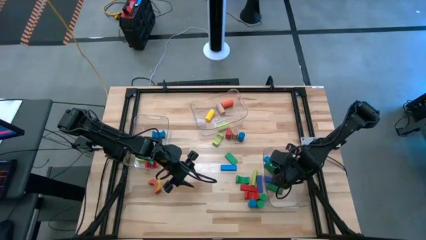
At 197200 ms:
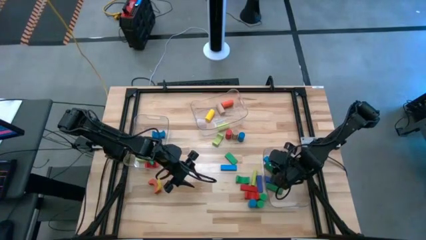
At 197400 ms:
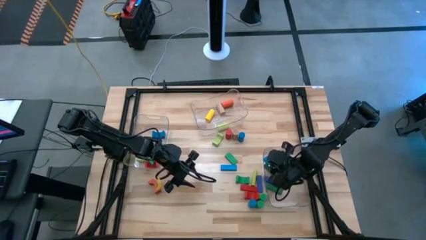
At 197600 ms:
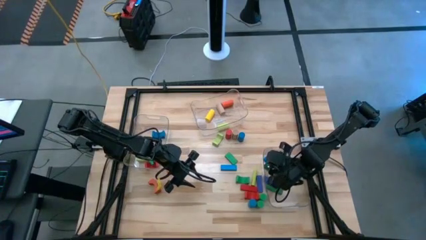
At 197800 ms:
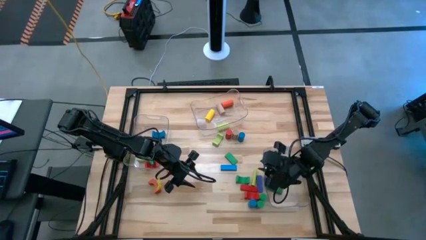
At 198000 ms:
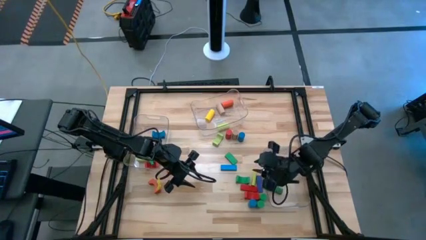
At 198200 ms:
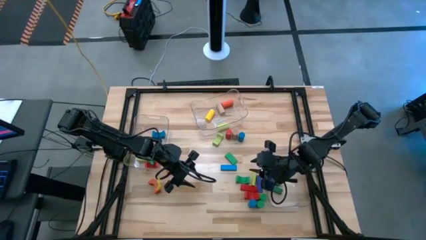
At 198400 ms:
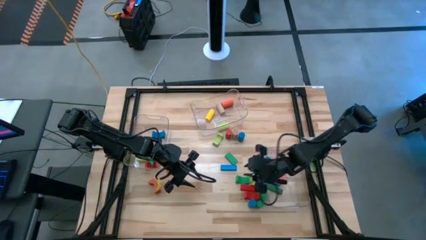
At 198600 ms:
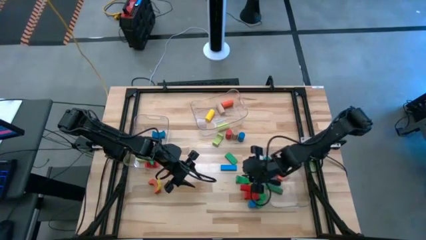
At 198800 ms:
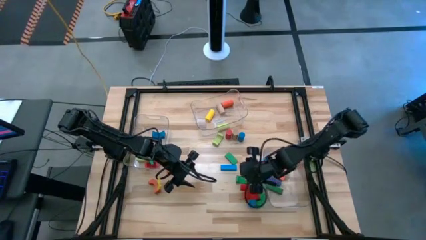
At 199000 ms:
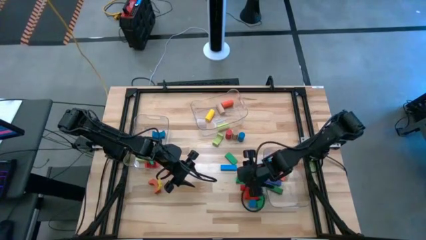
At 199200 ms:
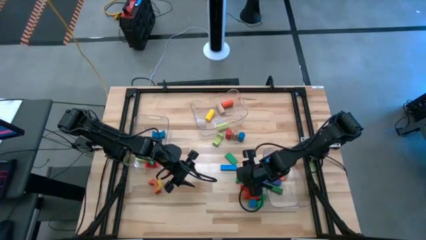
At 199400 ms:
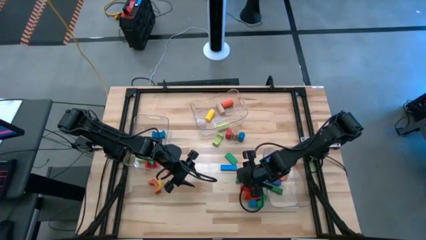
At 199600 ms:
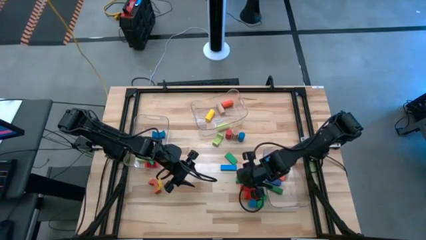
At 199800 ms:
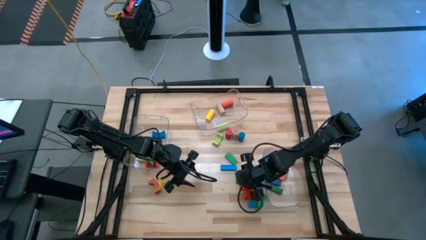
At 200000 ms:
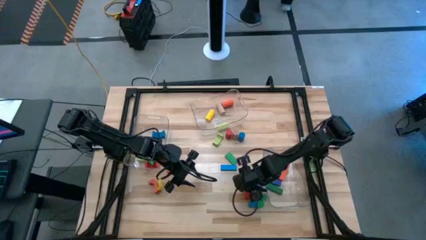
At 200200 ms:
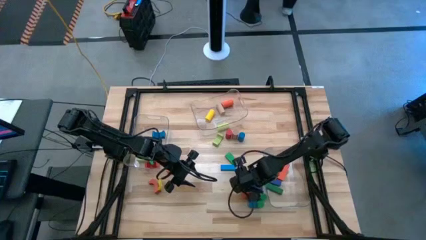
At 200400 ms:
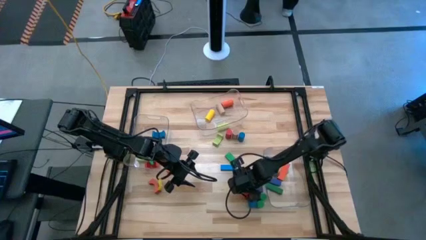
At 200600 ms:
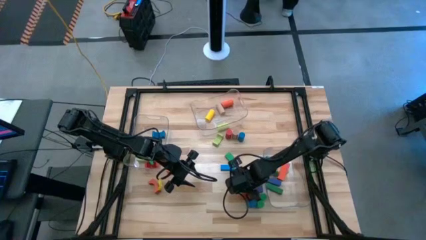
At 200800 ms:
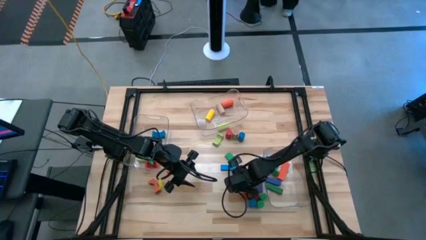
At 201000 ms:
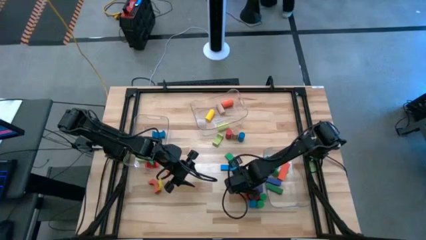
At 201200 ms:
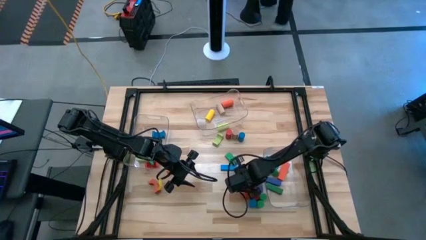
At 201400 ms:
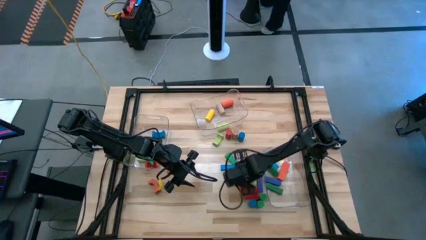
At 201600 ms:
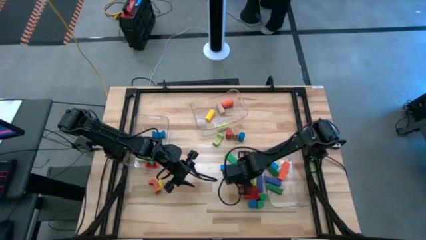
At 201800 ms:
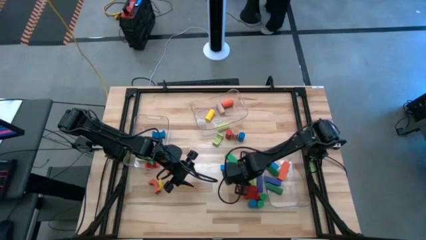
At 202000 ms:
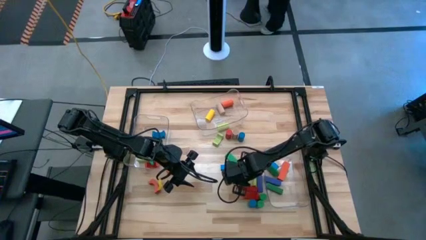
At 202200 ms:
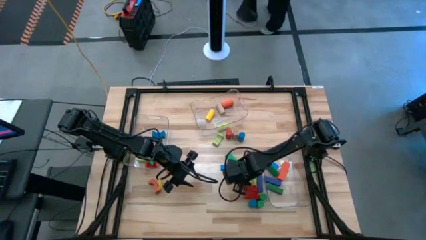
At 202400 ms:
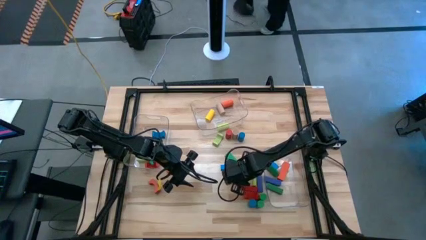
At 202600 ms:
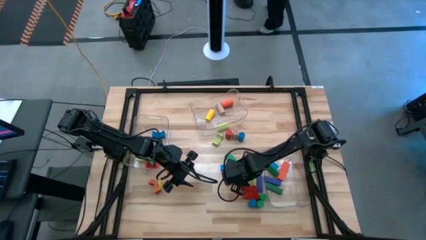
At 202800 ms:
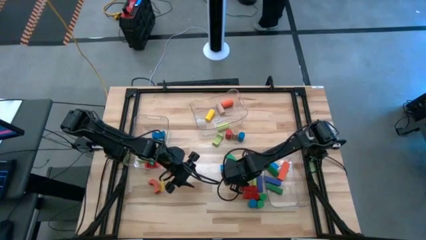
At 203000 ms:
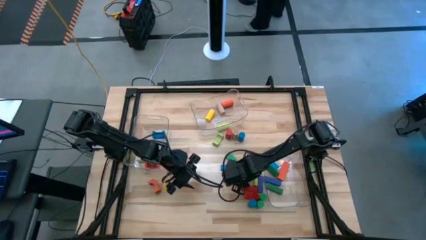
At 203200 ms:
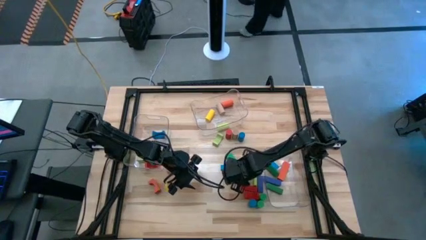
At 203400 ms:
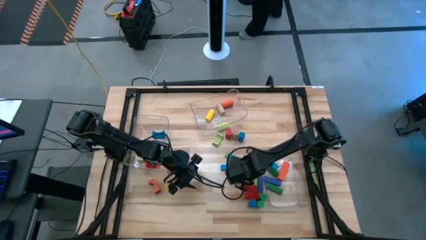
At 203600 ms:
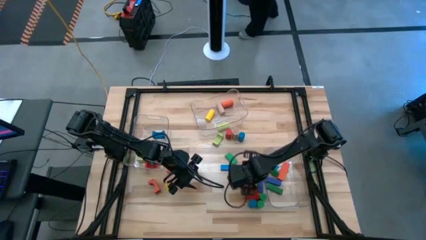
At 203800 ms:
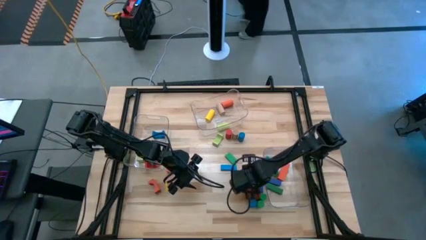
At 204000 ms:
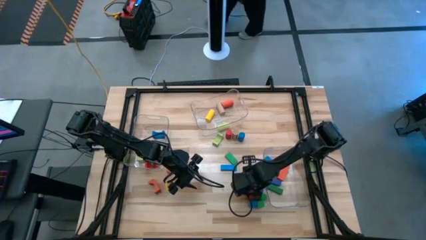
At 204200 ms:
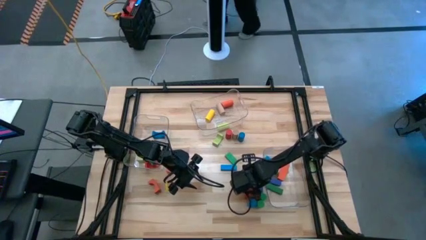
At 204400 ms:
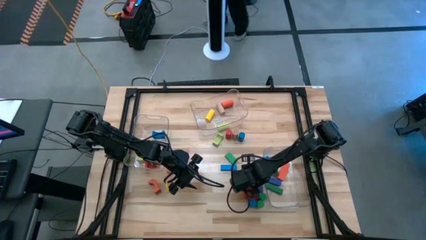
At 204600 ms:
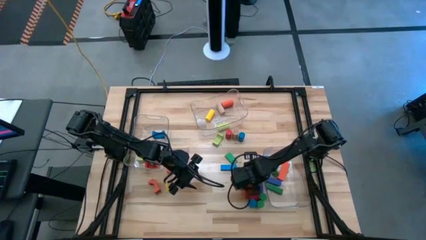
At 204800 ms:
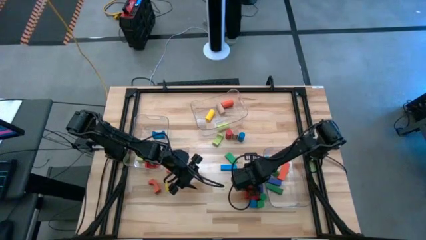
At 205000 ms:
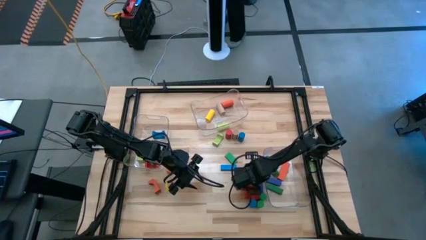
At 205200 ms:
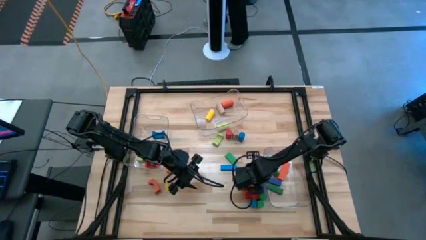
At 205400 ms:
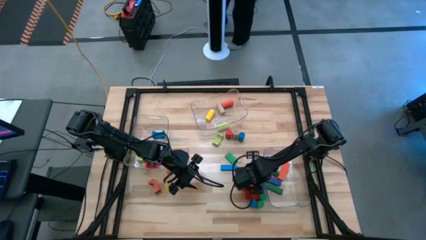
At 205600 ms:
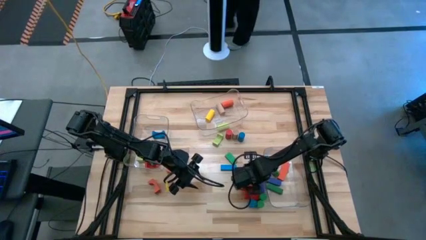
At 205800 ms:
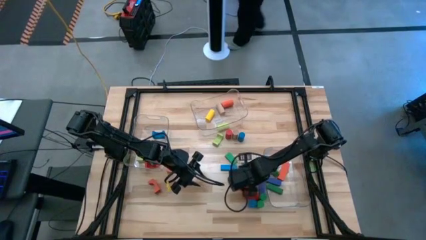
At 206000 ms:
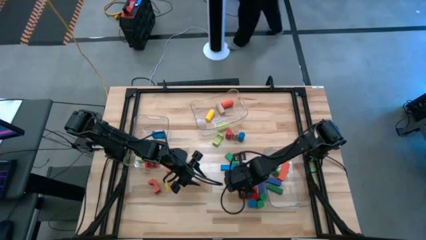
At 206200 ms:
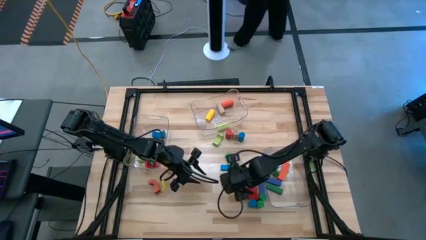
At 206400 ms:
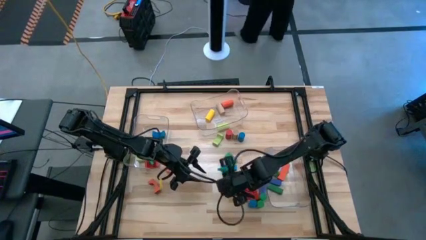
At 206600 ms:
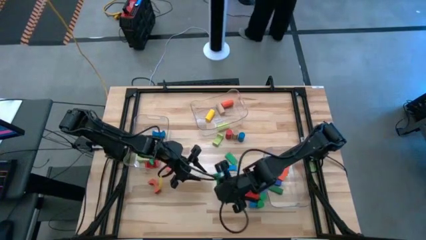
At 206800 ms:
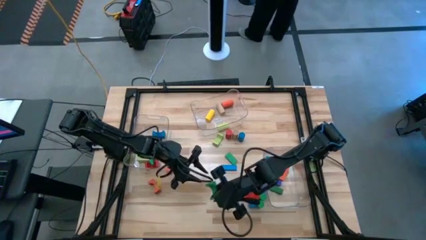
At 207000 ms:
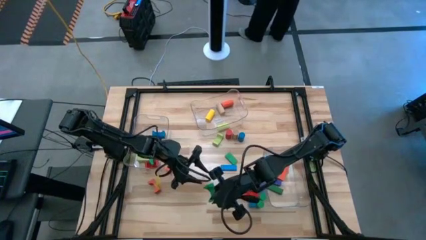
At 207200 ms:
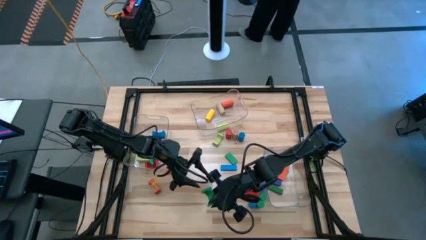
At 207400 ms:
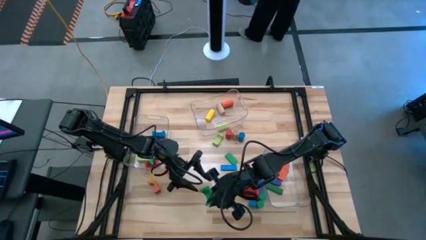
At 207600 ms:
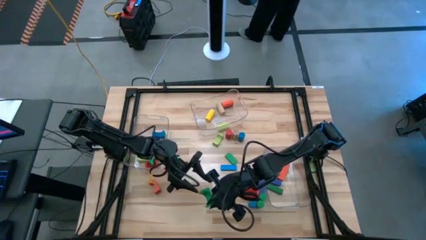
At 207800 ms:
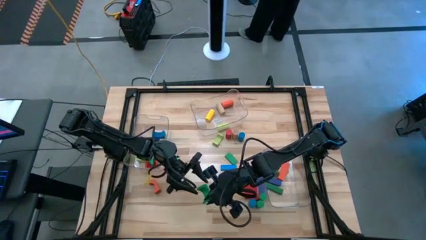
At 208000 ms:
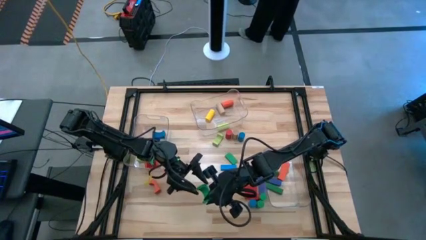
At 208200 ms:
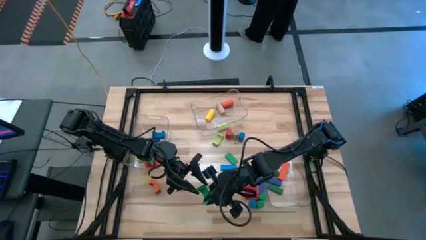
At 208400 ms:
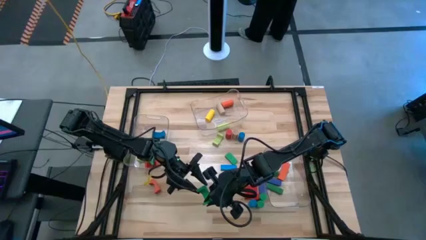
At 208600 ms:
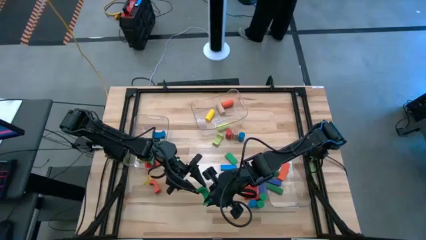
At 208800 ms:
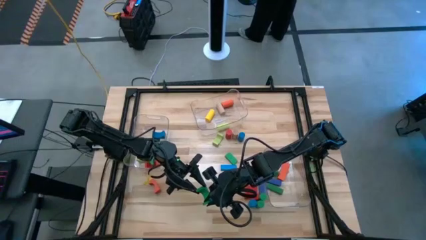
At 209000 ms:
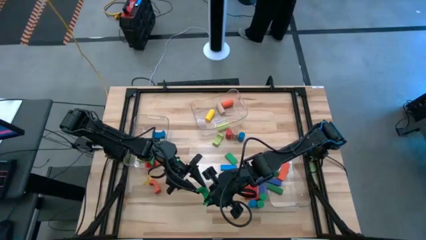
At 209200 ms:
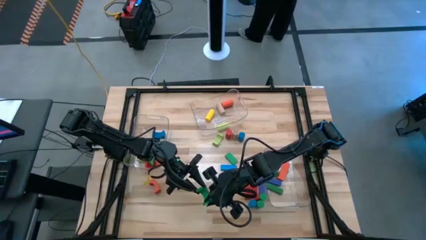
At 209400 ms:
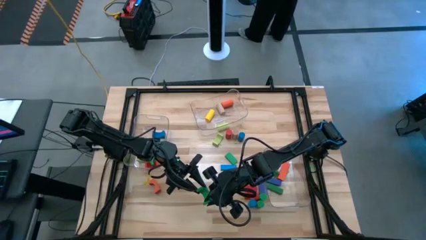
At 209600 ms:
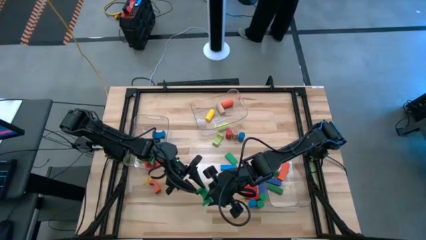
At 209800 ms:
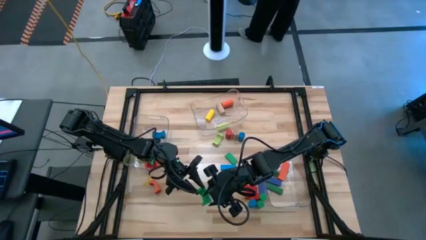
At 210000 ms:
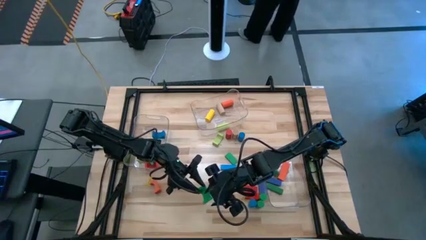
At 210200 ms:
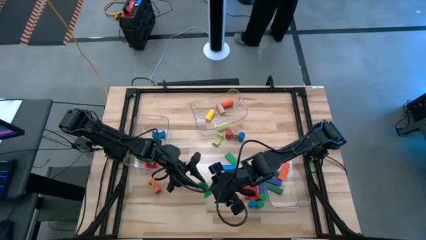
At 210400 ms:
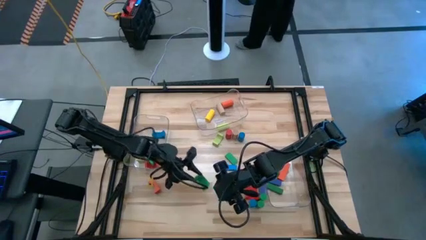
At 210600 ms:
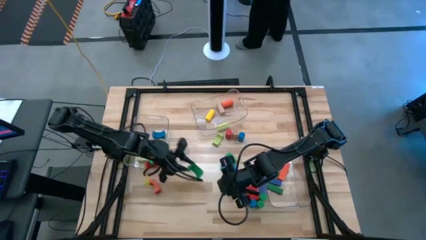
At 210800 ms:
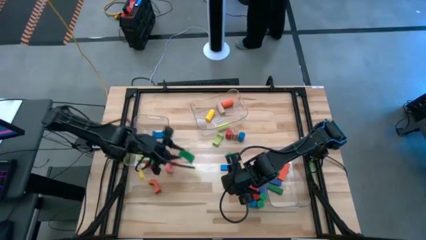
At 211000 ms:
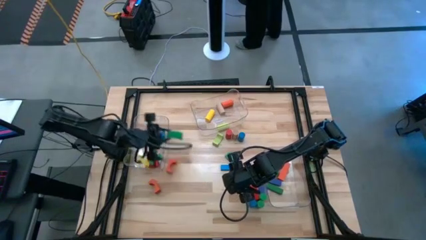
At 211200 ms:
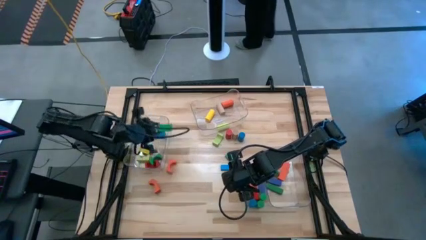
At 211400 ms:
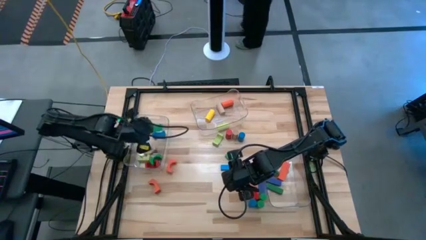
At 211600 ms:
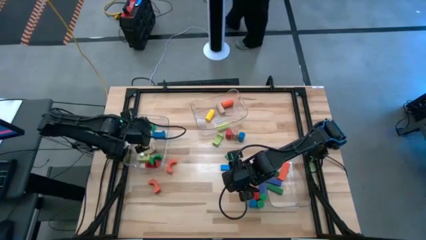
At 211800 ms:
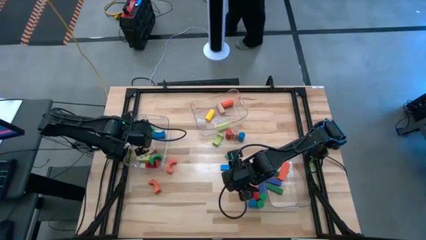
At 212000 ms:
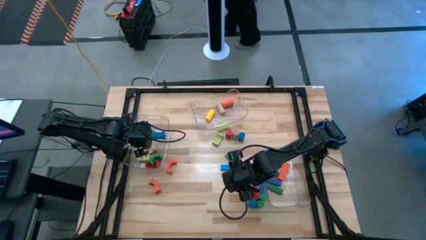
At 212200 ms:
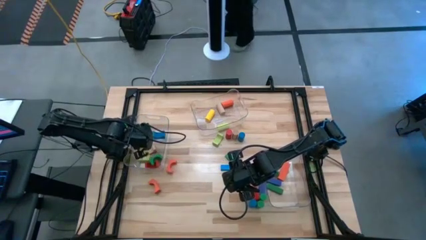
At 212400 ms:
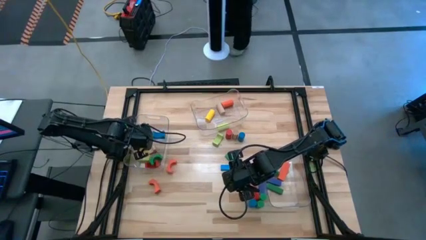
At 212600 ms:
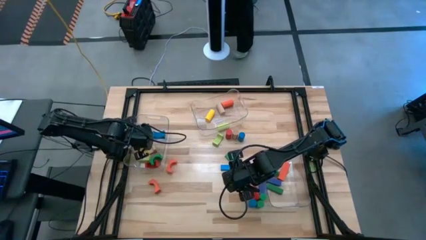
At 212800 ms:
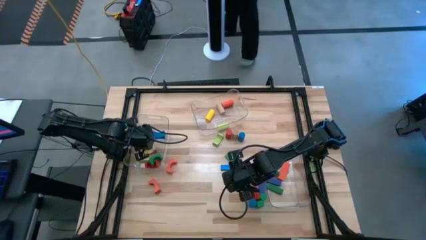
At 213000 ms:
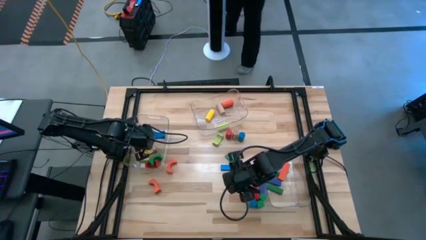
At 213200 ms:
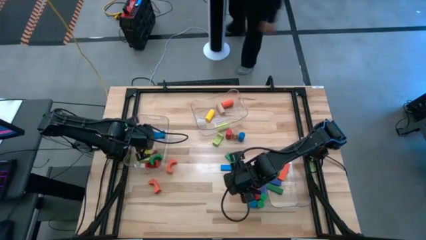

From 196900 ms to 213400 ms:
Task: Sort blocks by size
Put the green arch block into the left transparent bin
